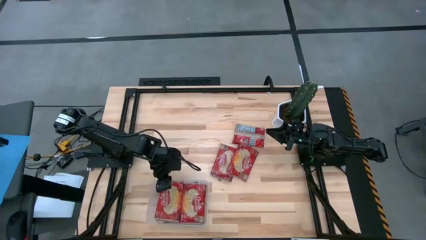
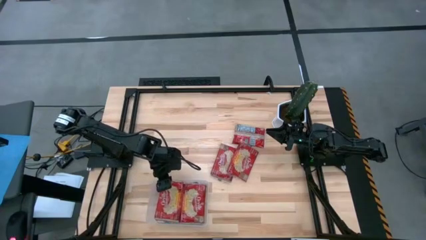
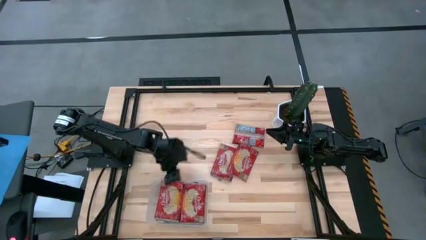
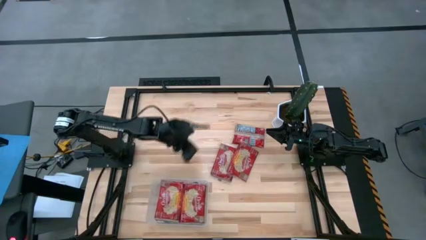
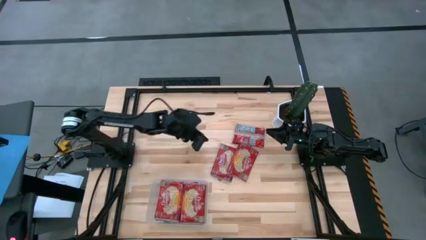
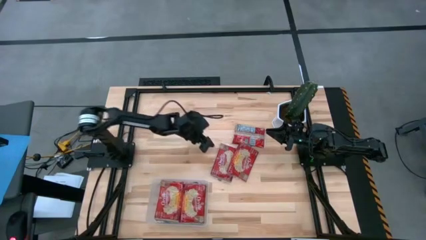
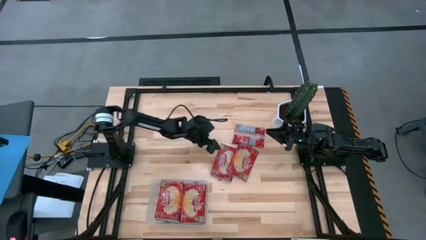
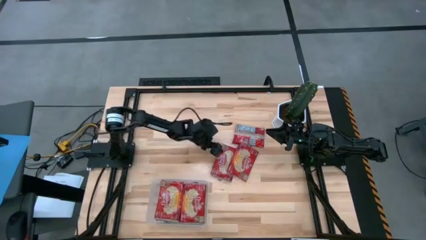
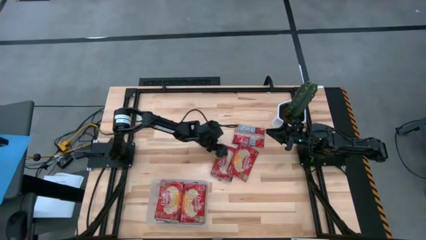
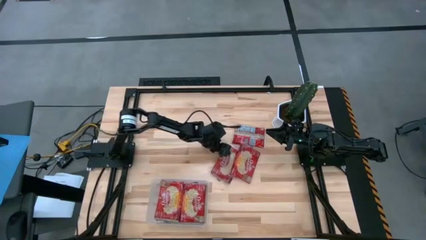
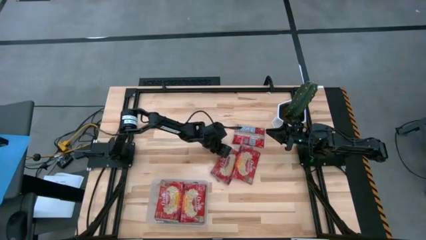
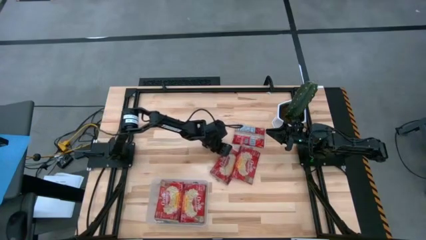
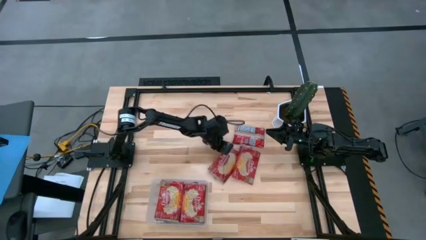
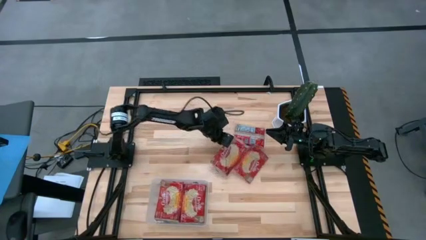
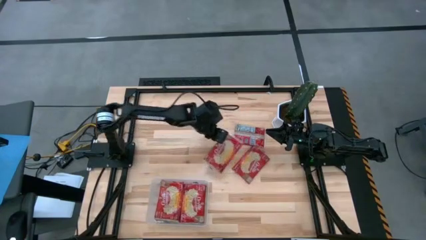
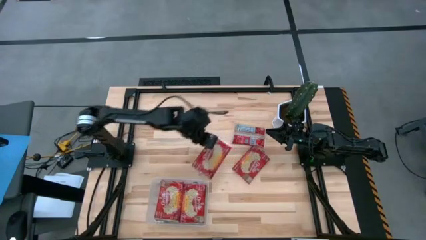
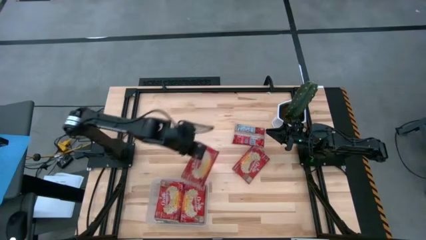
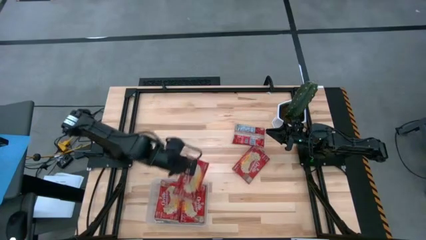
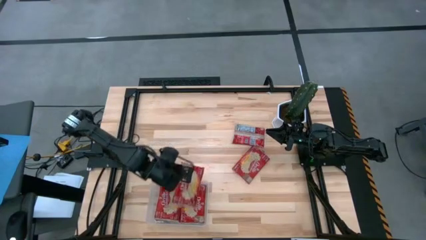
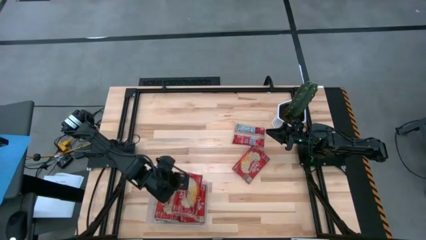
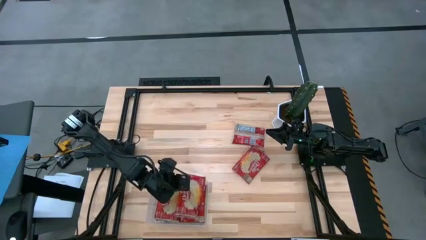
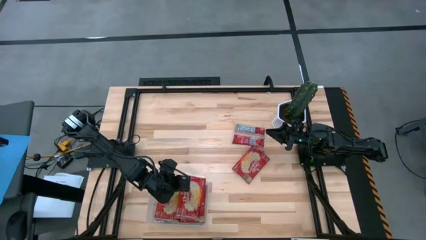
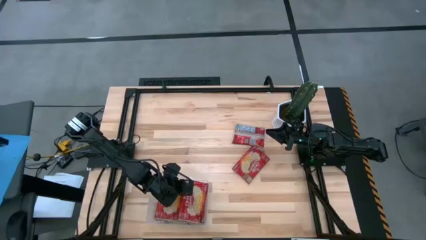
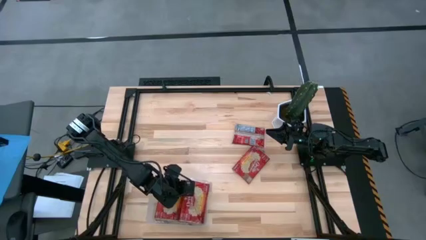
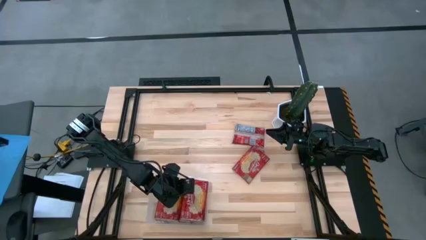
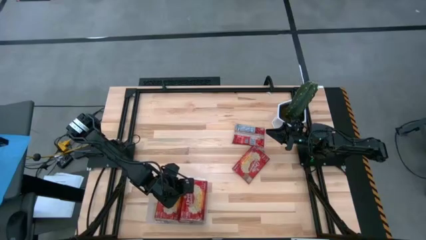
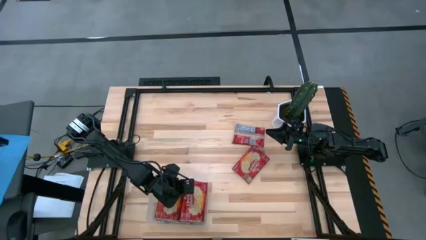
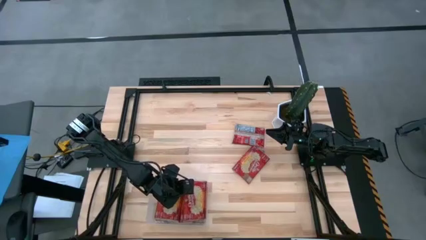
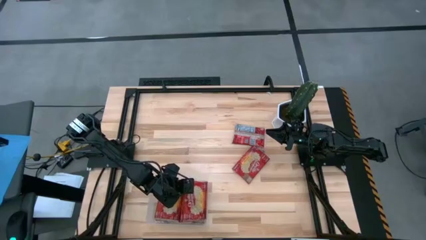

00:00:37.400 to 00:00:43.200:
Task: Sort popcorn bags into baskets
Put the bottom left popcorn bag into the transparent bin

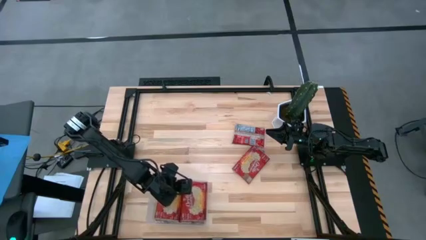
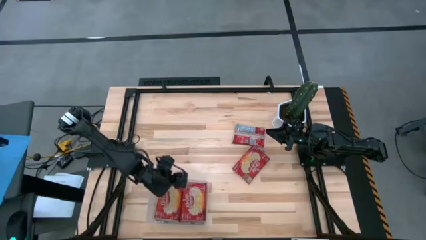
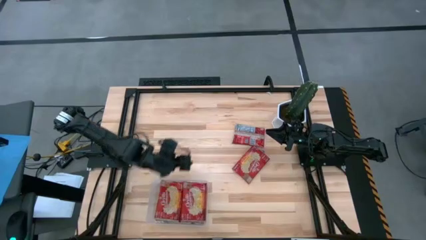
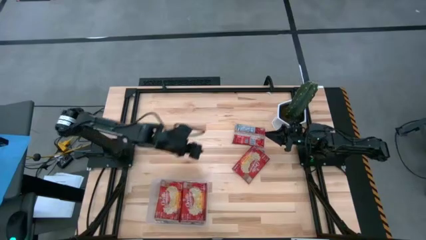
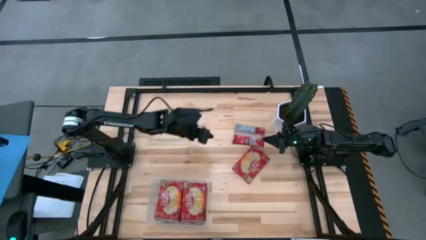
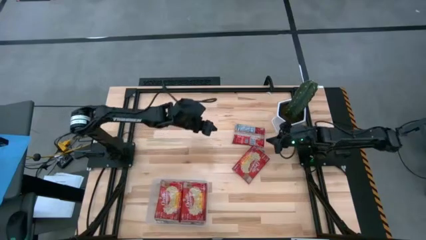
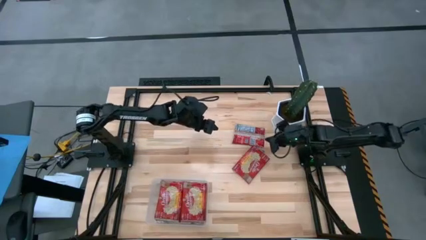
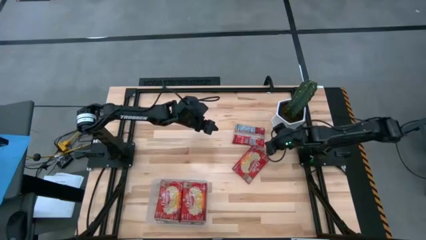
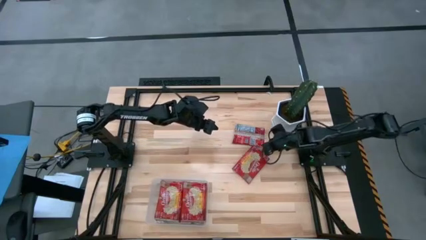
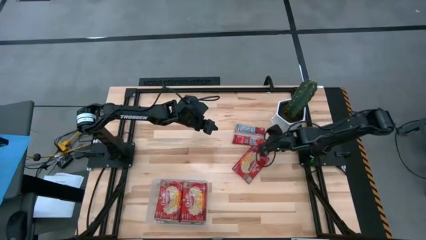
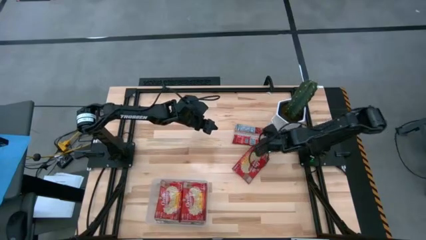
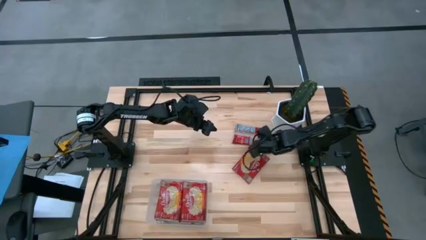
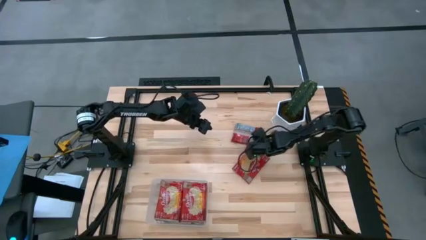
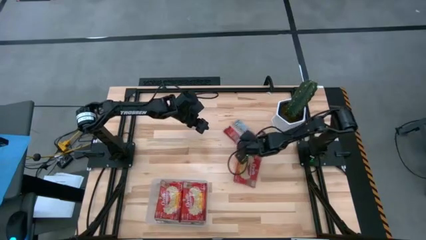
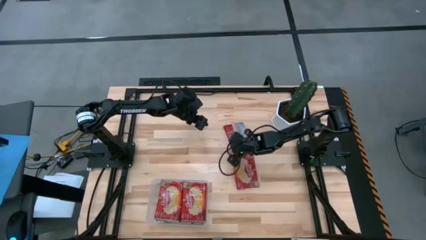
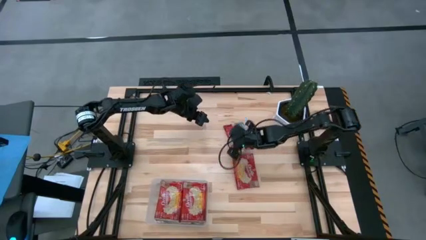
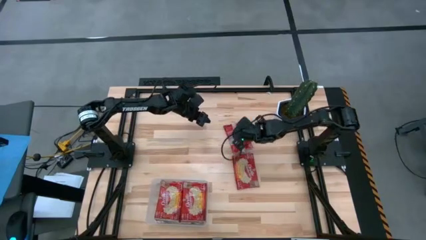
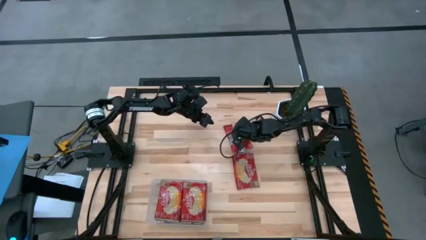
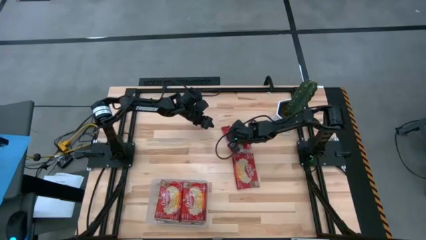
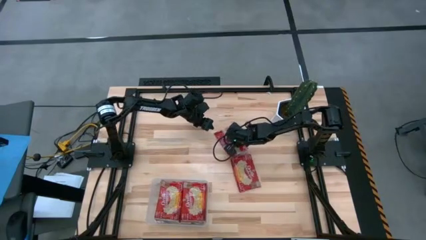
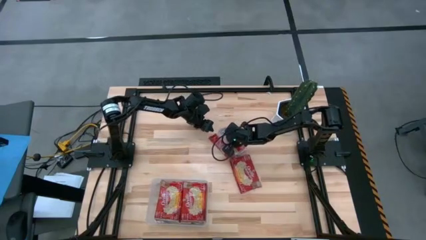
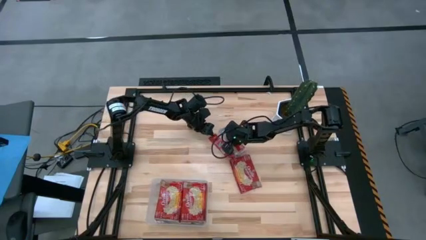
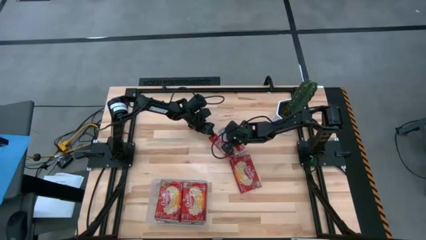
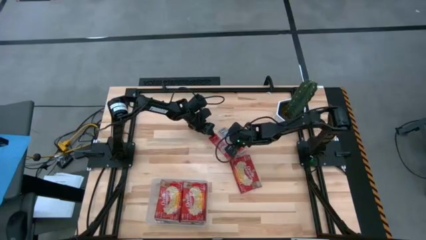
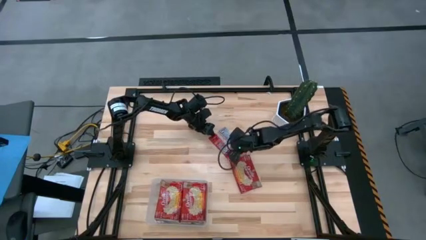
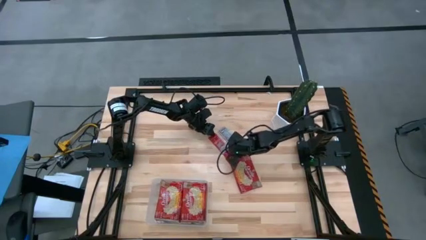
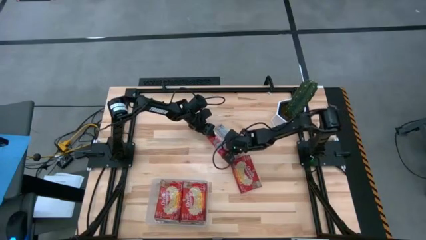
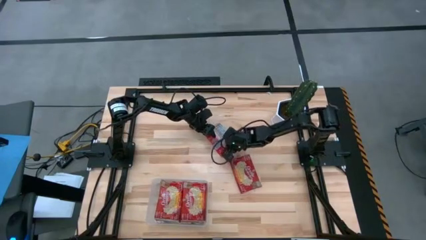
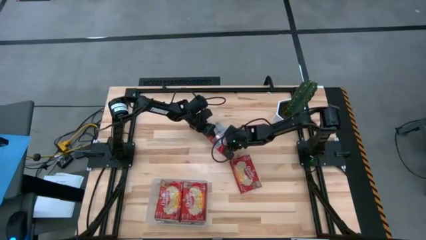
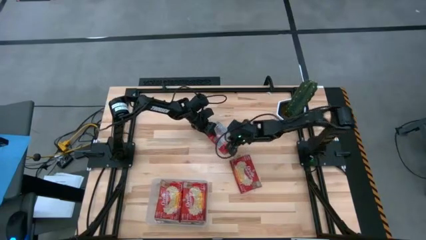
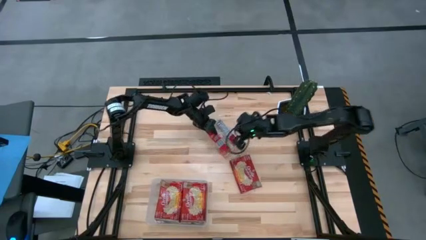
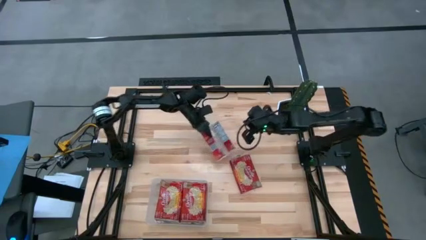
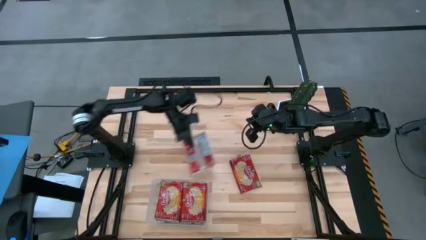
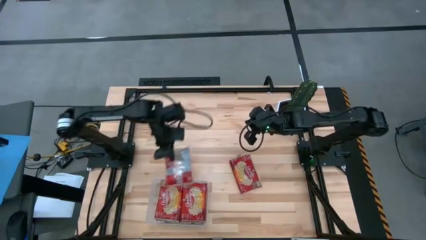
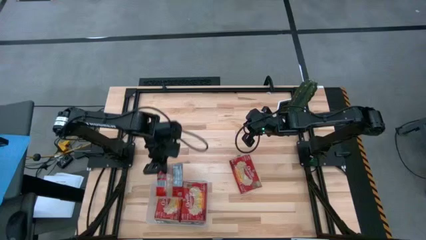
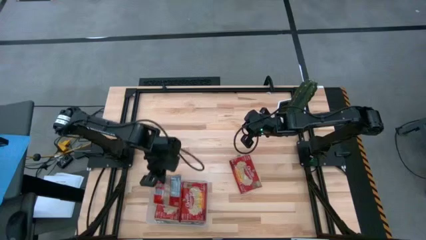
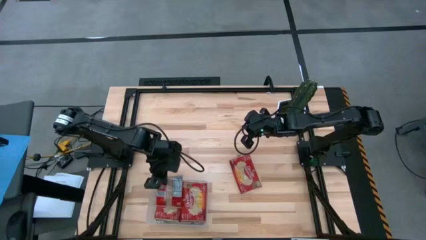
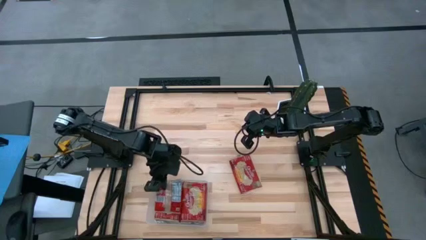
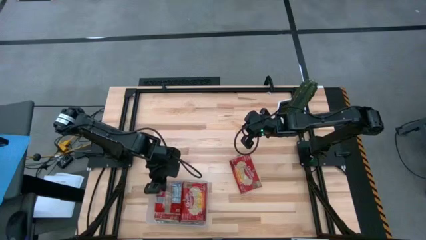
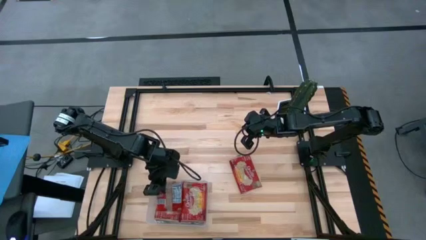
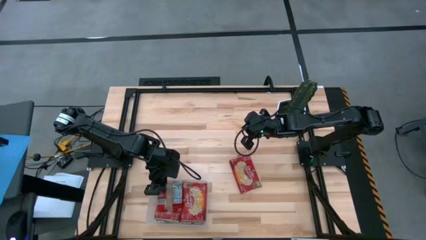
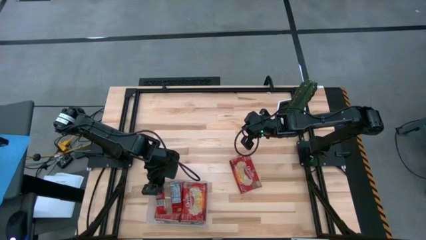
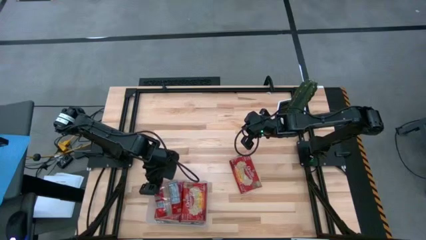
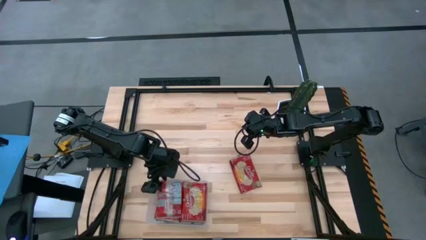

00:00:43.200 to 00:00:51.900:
Put the top popcorn bag into the transparent bin

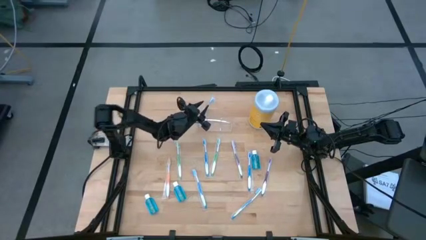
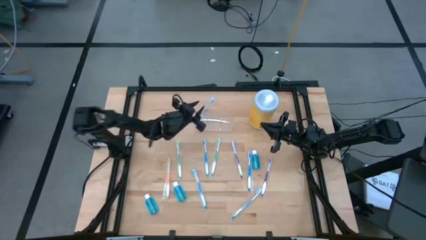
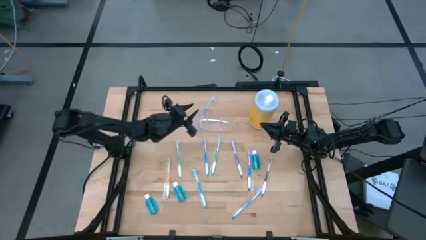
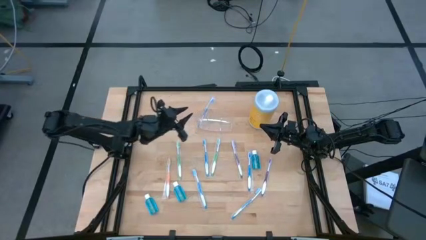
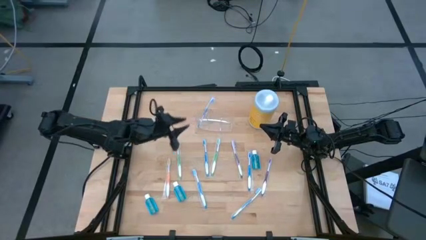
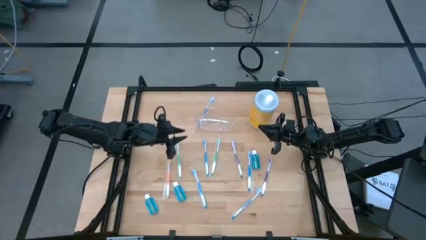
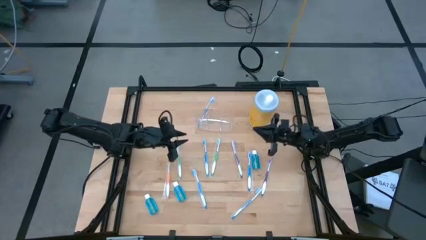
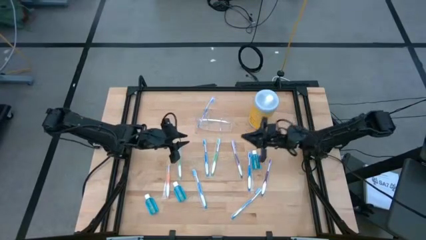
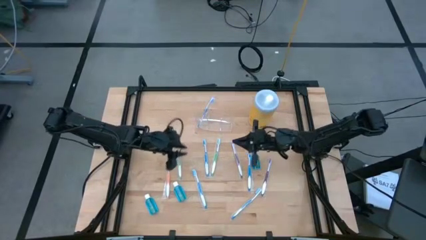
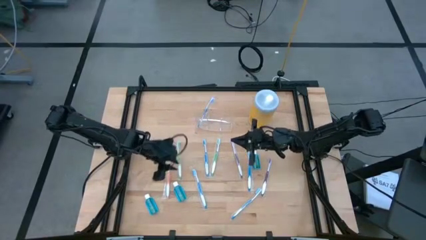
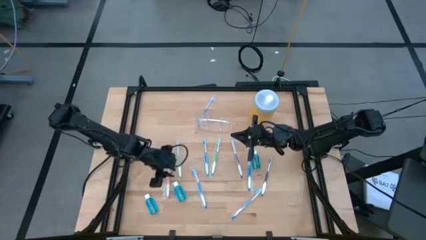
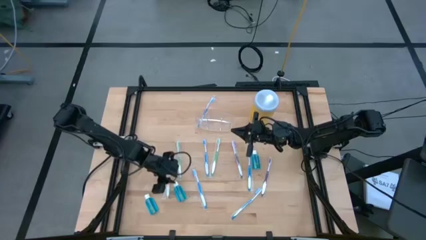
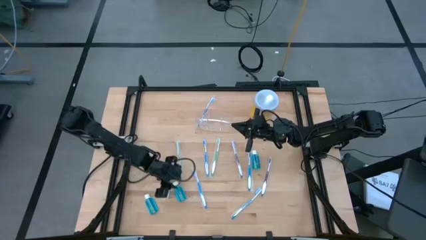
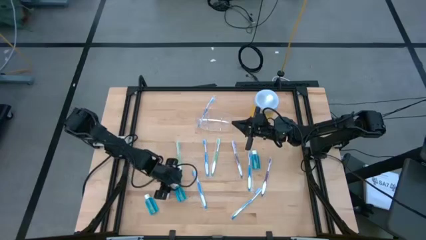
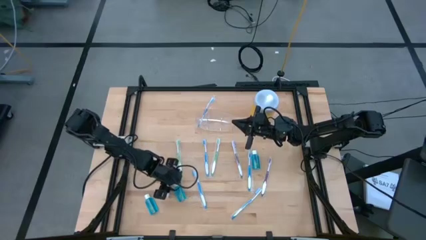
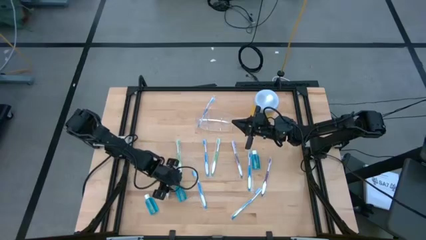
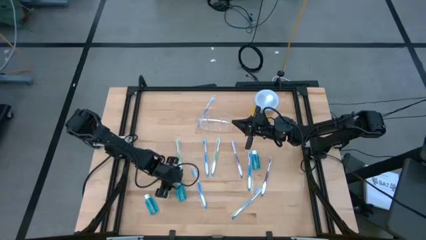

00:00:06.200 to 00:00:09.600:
Task: Pick & Place toothbrushing station
Put the blue mouthwash into the middle compartment of the transparent organizer
